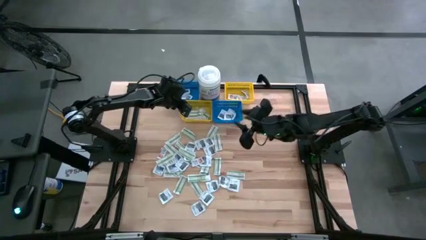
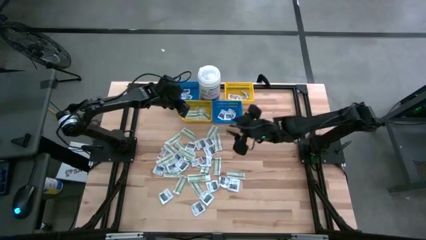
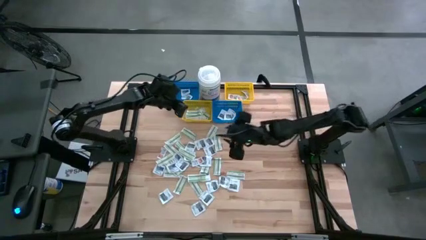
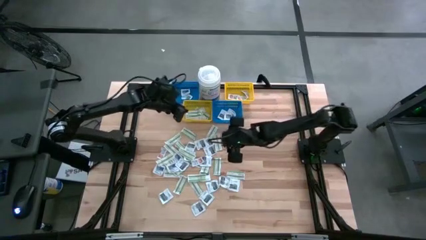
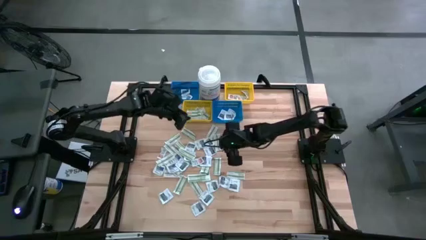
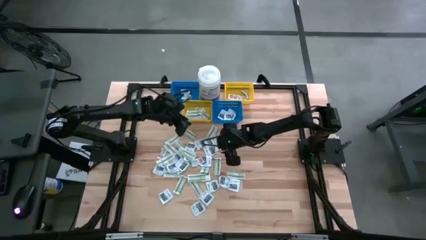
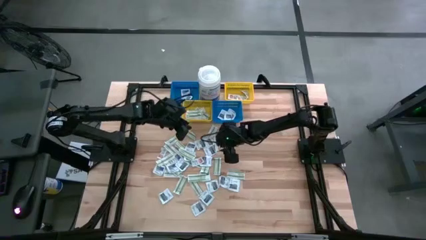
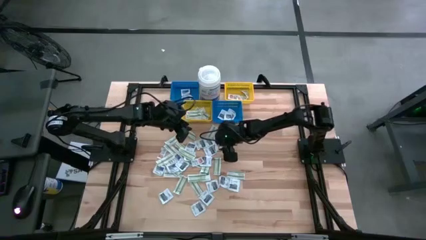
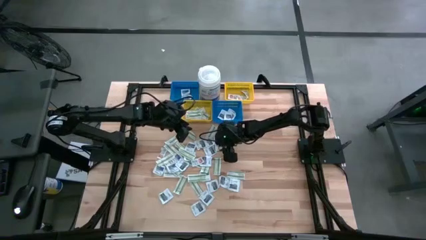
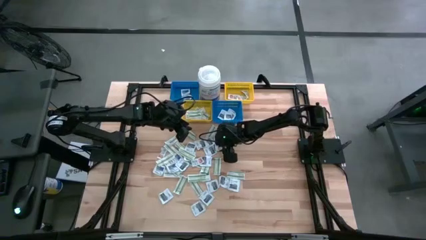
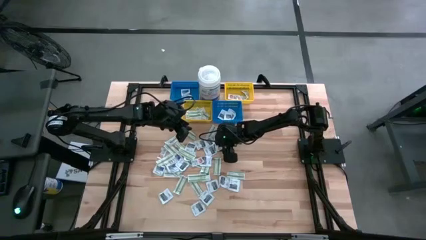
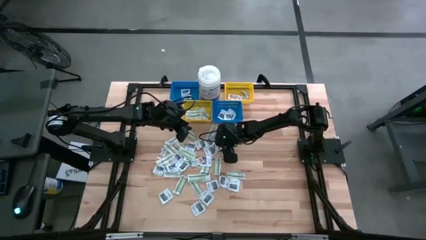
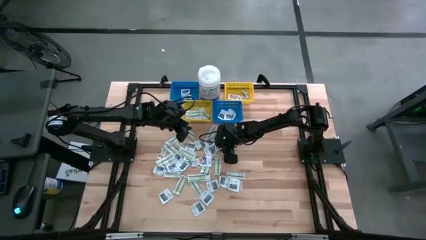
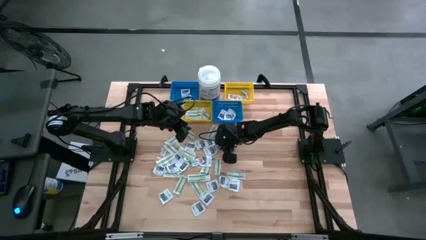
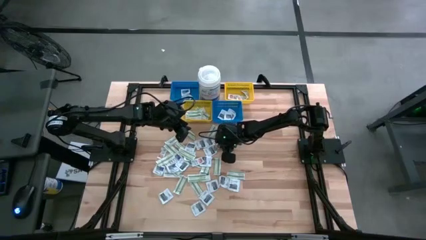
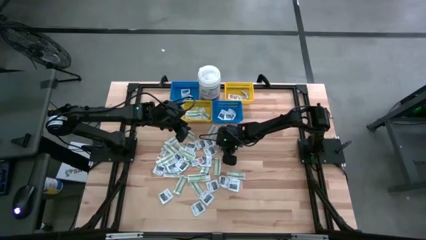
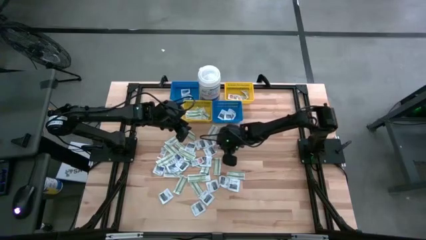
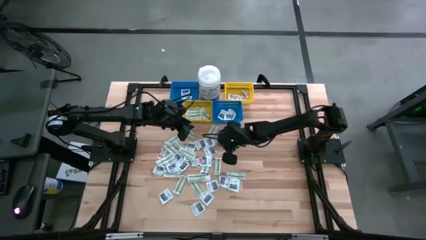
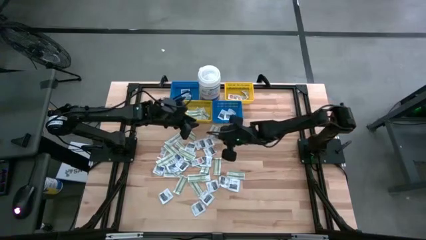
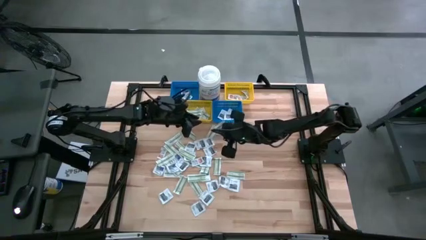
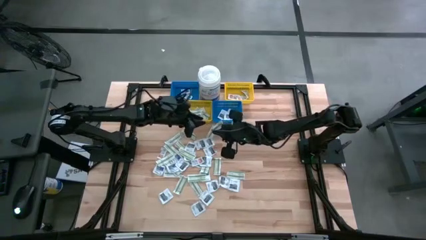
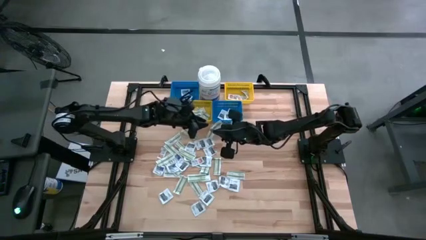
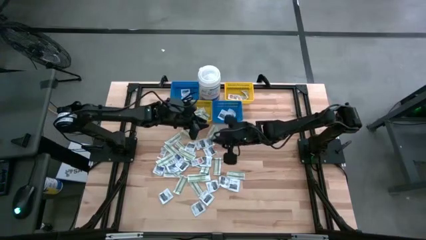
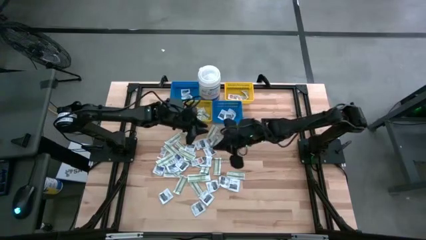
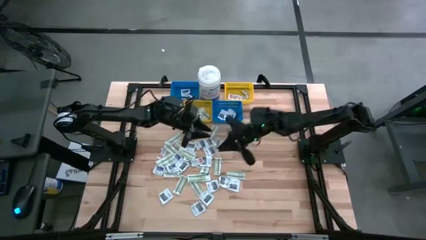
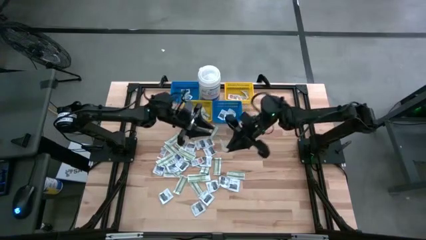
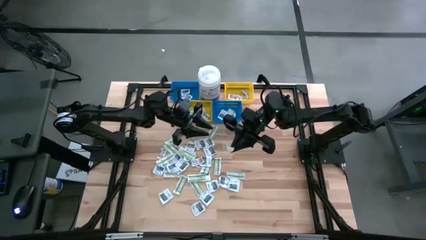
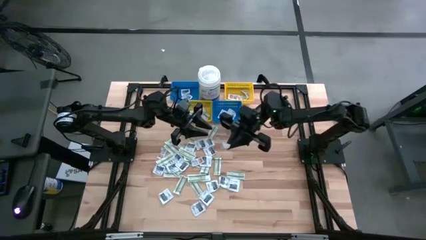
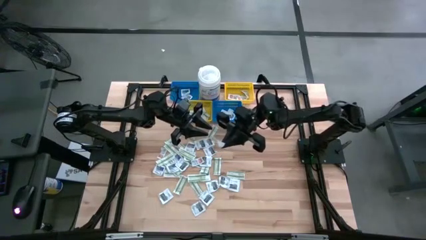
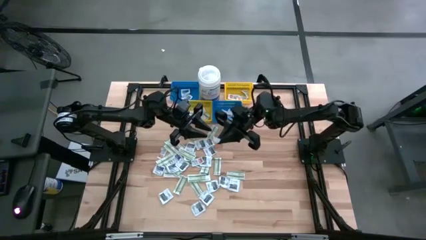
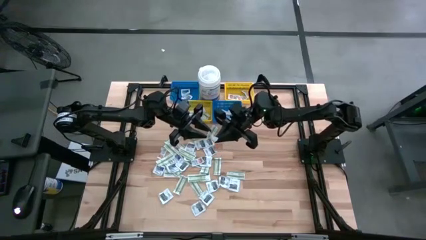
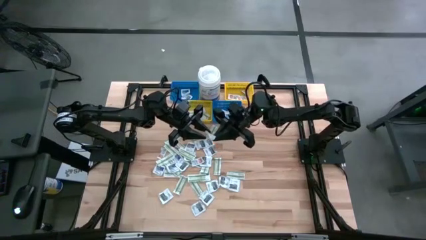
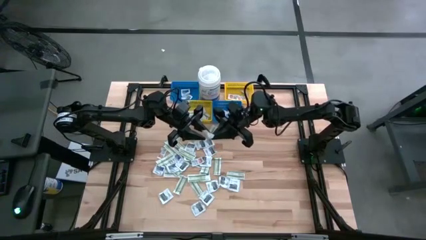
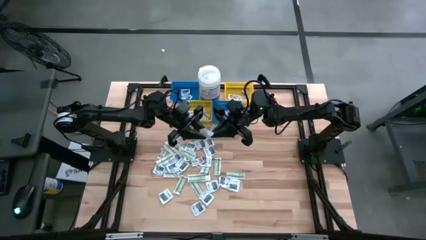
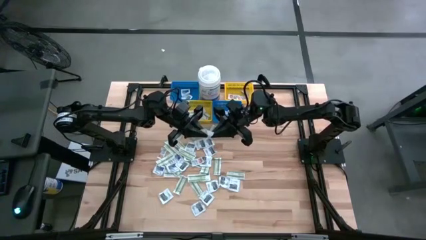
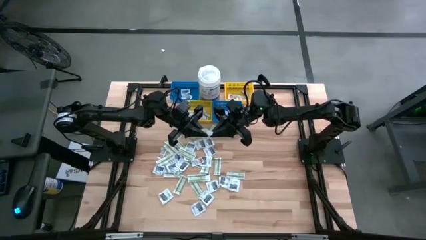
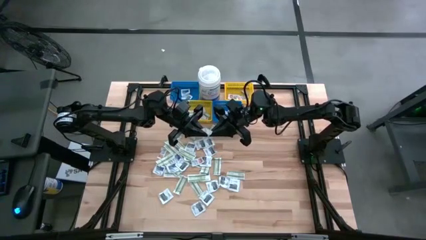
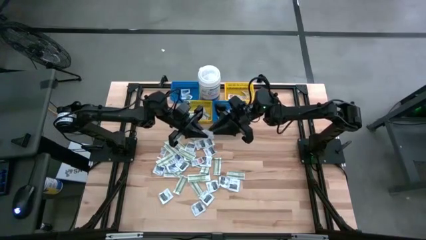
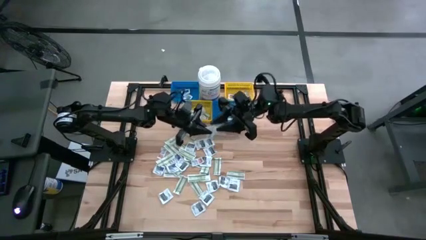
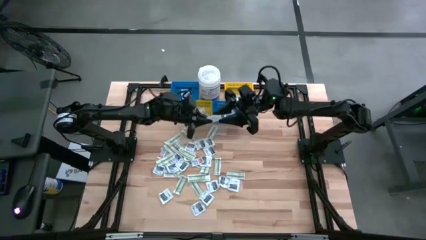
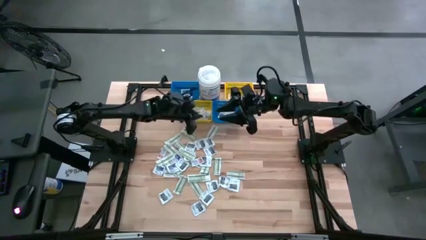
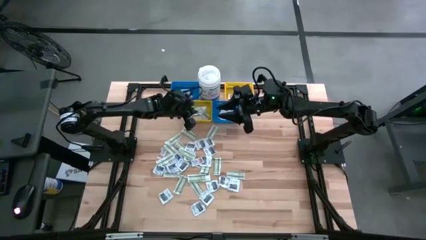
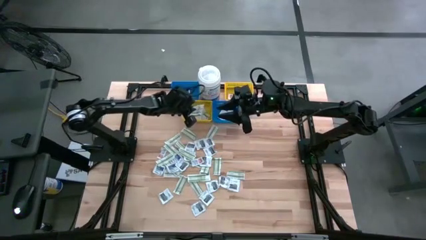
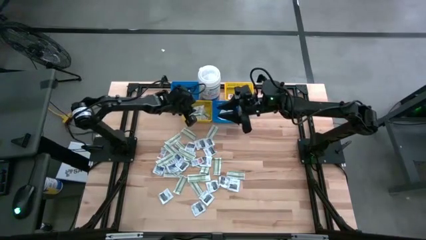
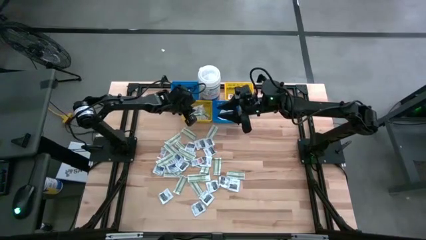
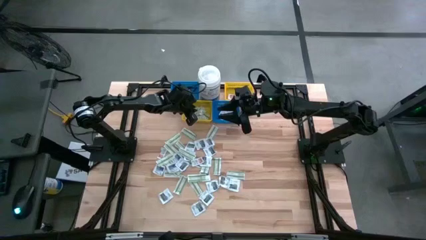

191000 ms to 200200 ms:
Task: Pick & Place First Aid Supplies
Put the green bandage pad into the left yellow bin

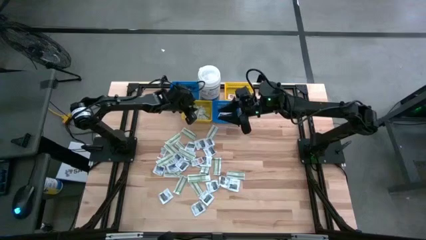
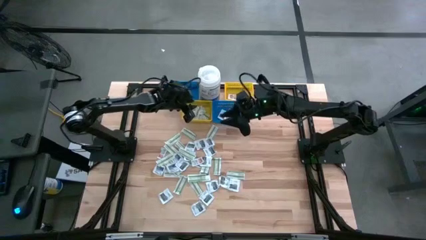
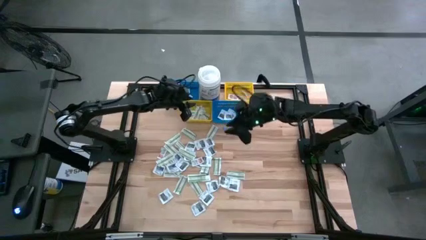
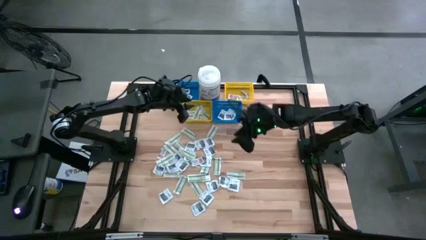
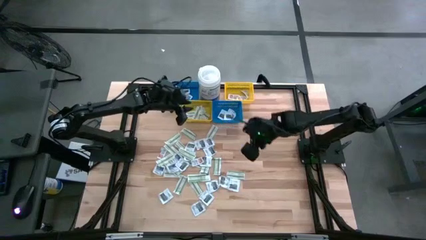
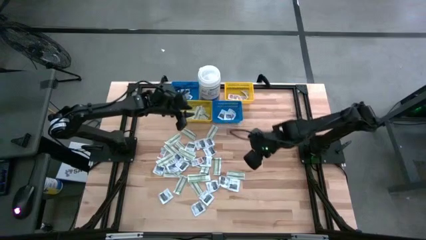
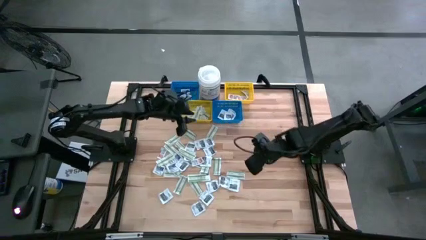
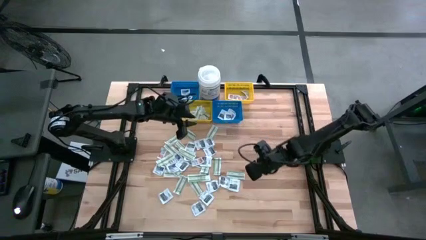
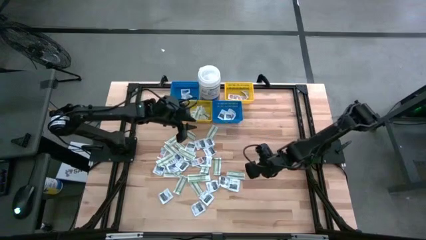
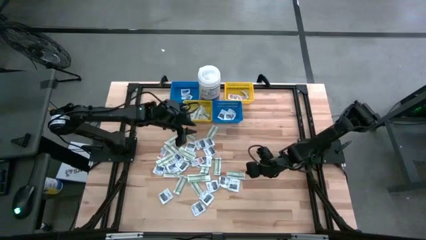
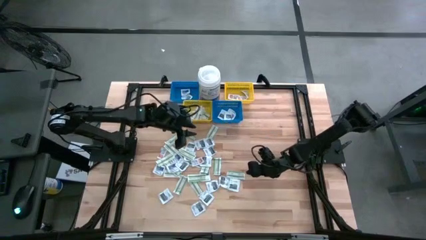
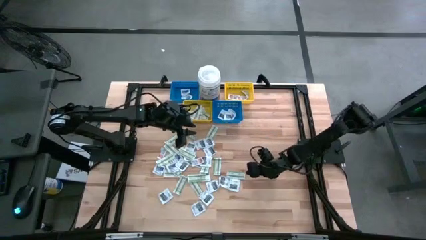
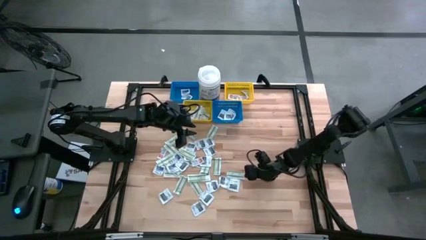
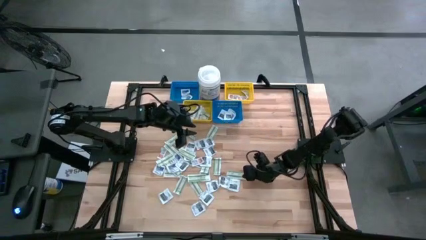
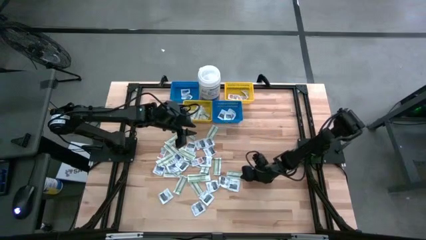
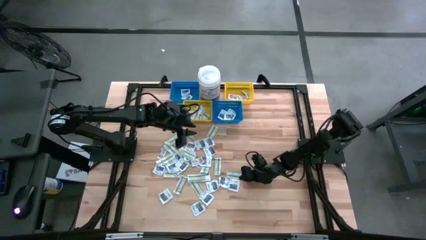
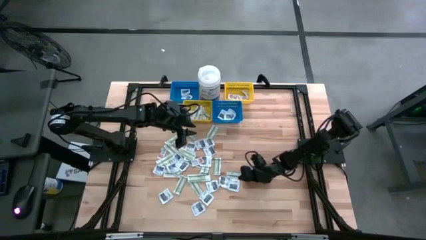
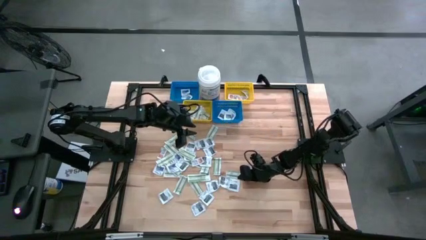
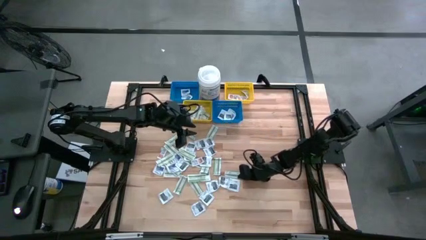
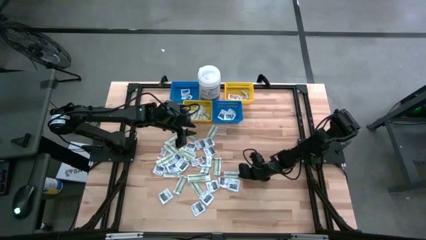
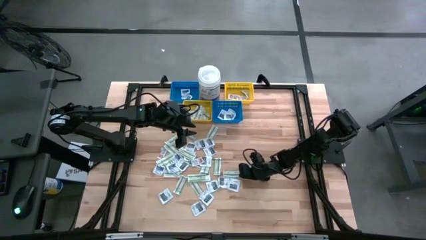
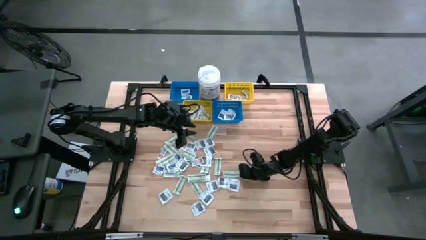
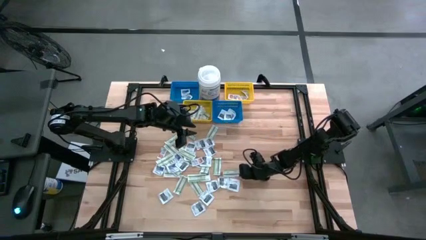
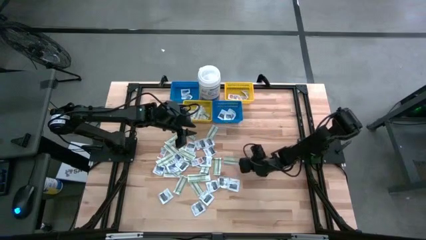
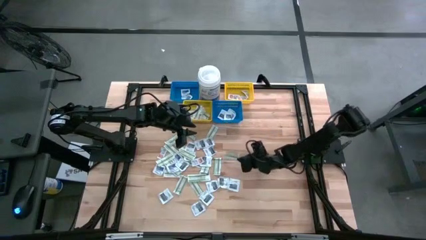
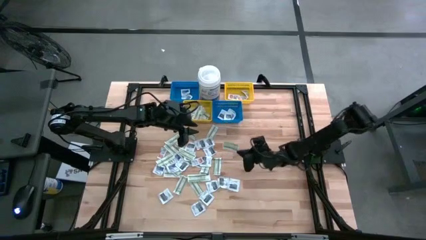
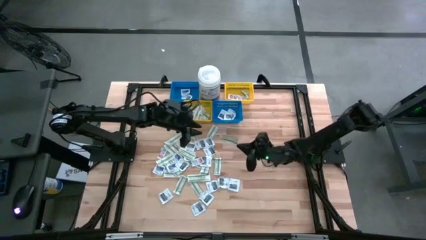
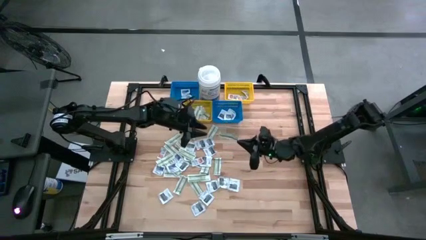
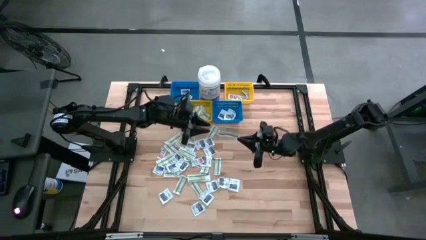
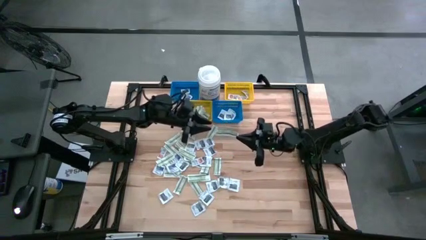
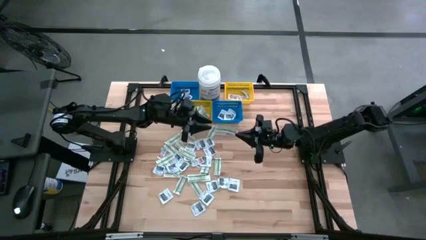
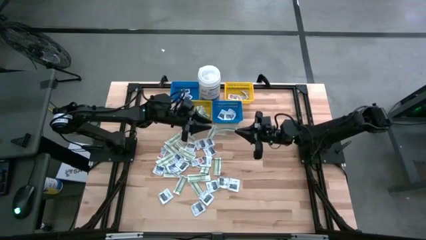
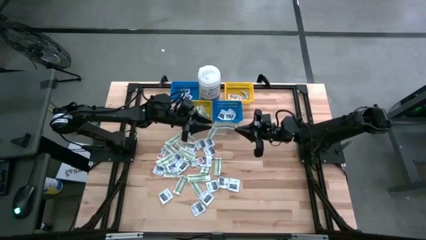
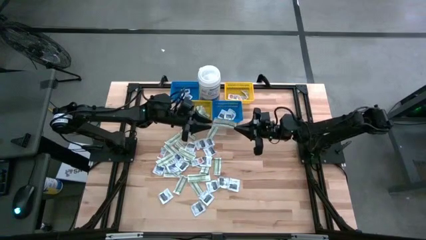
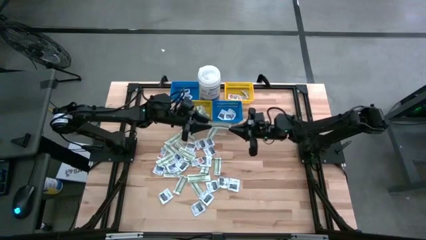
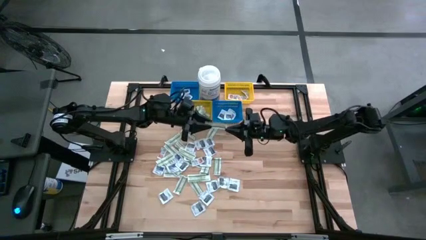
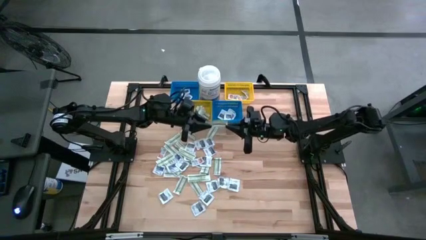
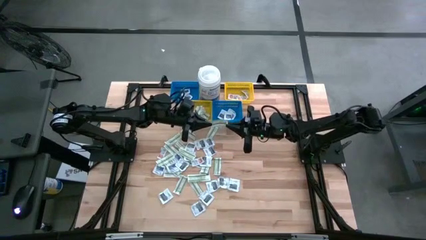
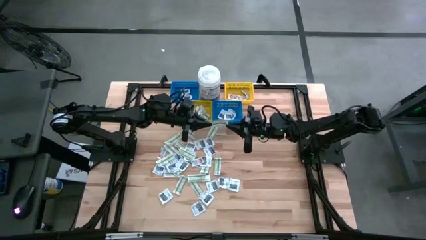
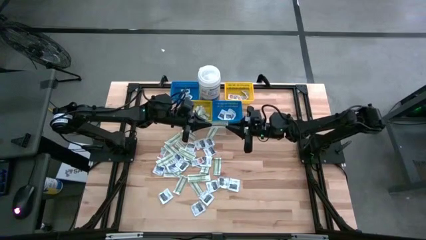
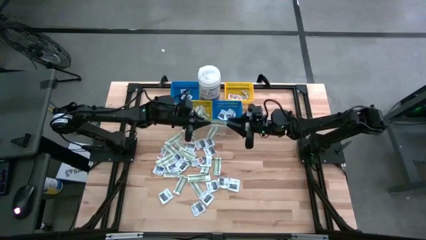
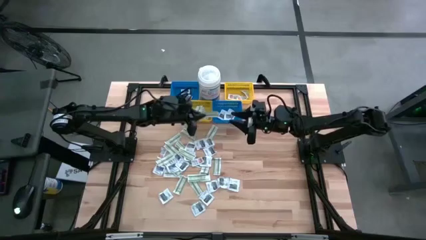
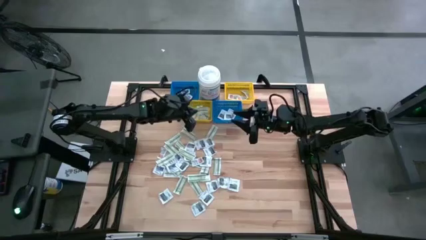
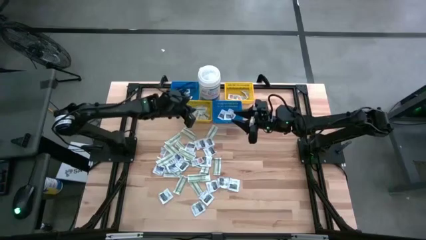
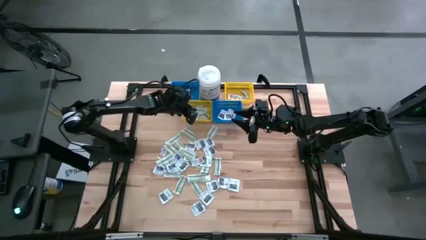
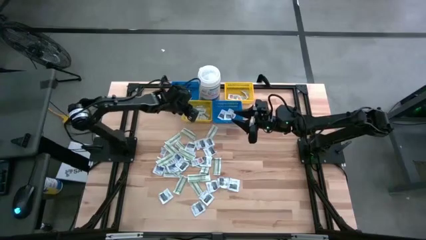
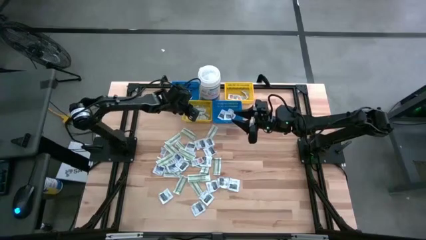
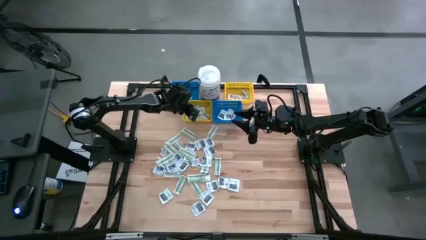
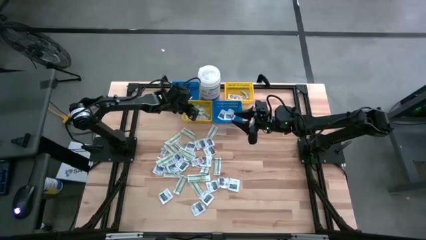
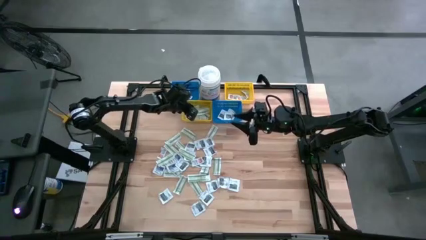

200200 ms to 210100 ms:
Put the green bandage pad into the left yellow bin
